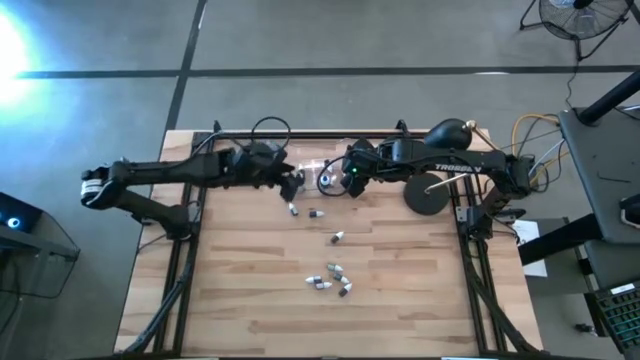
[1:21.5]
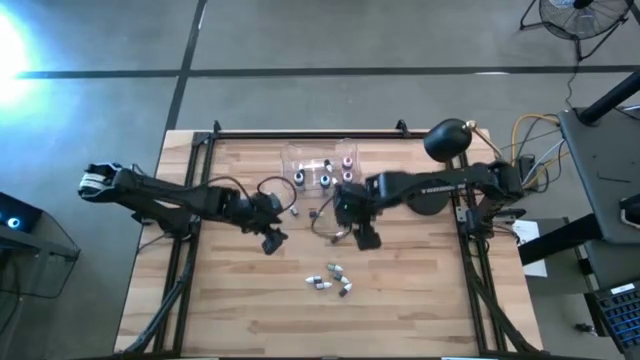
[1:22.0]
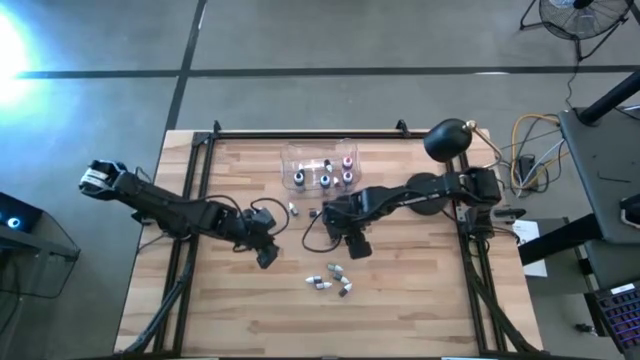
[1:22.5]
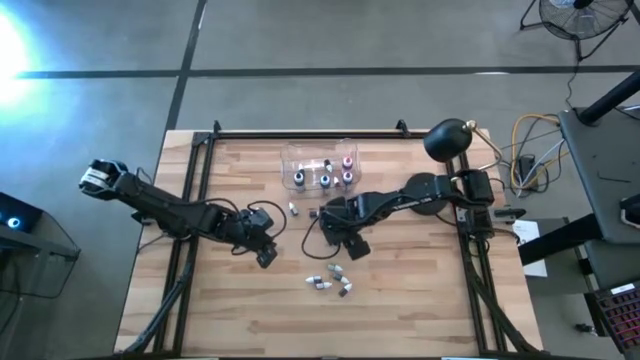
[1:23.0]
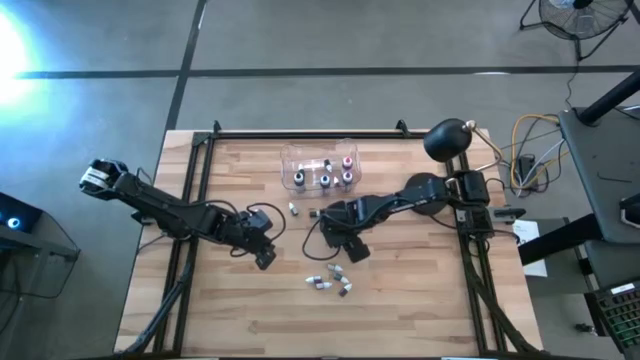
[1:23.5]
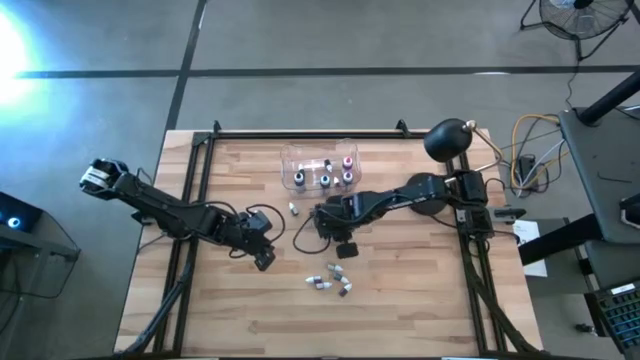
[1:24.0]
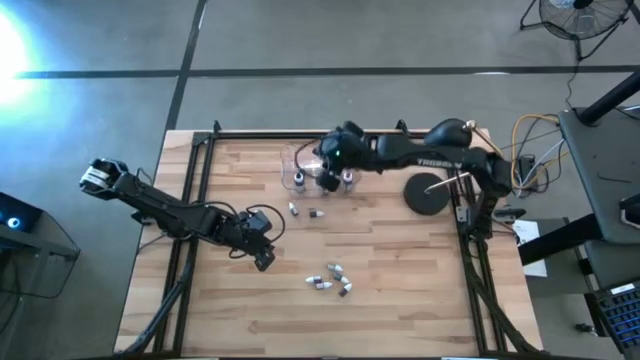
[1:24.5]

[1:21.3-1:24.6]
Task: Pick & Place food coloring
Put the small black food coloring bottle into the transparent bin

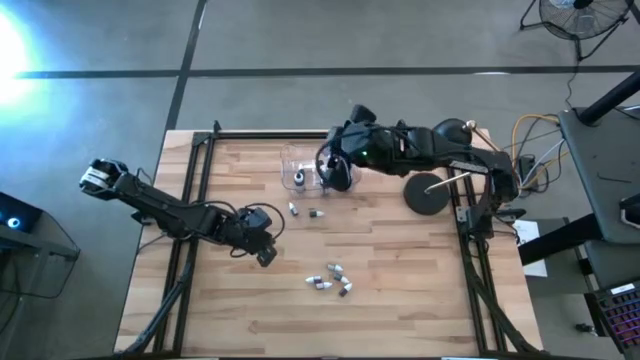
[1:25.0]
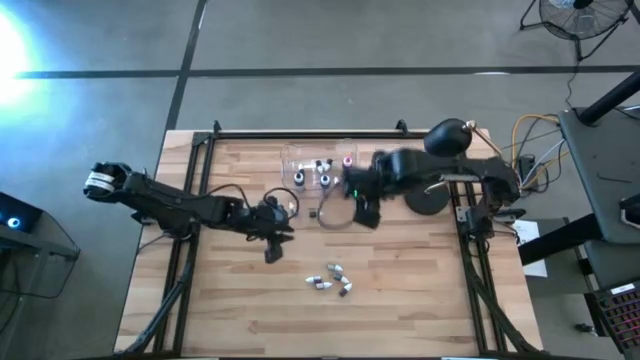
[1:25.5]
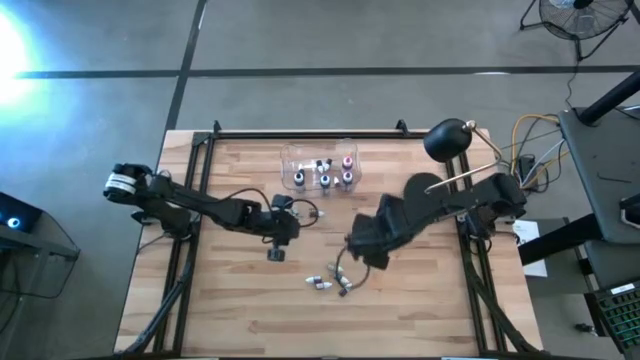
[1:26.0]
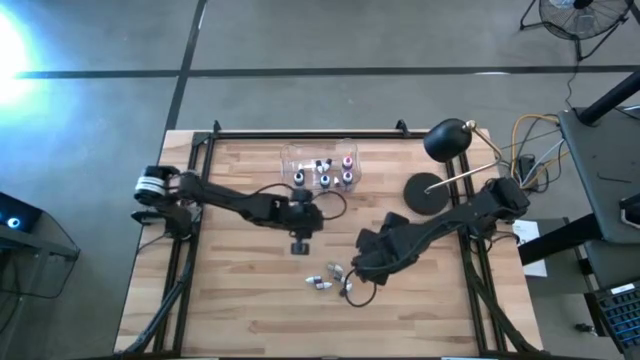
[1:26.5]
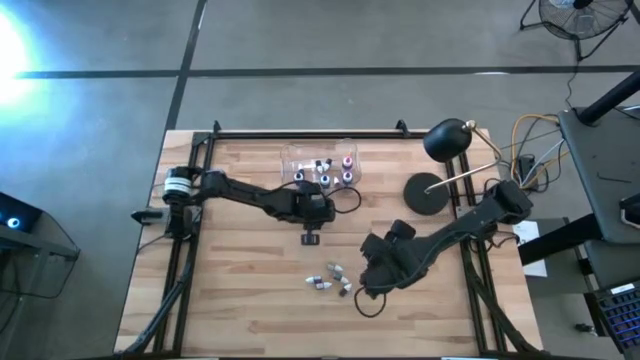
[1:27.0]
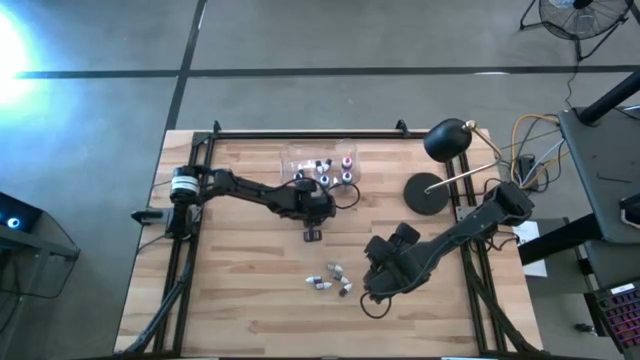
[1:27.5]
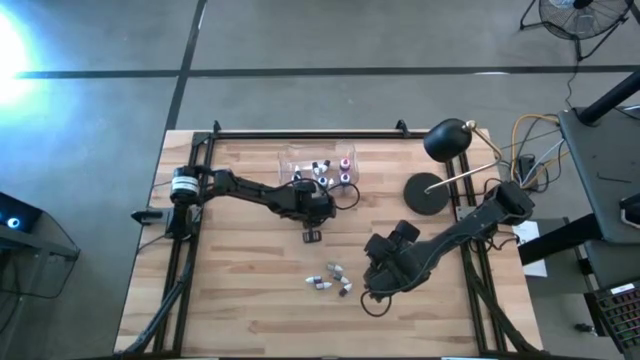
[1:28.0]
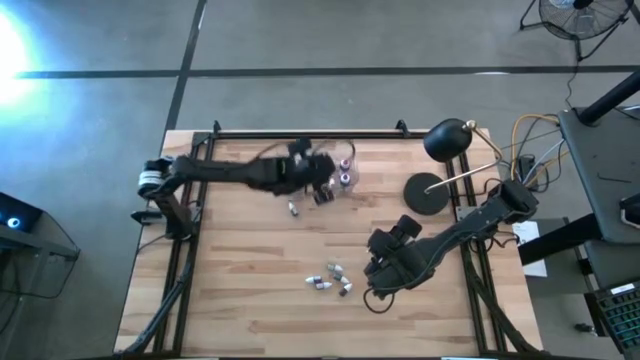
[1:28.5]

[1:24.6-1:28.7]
Put the small green food coloring bottle into the transparent bin

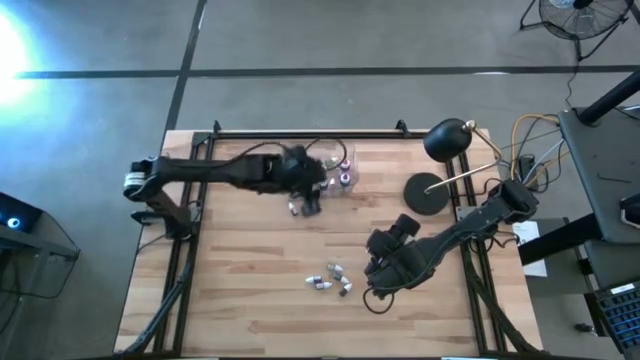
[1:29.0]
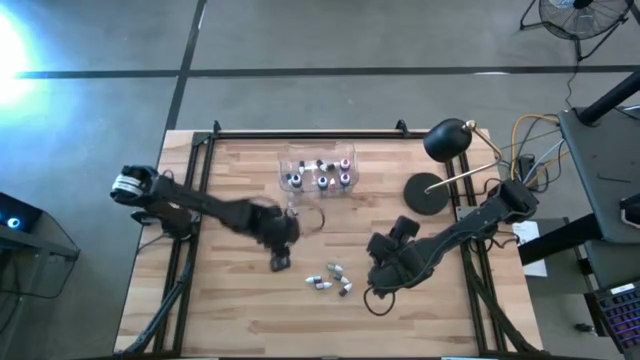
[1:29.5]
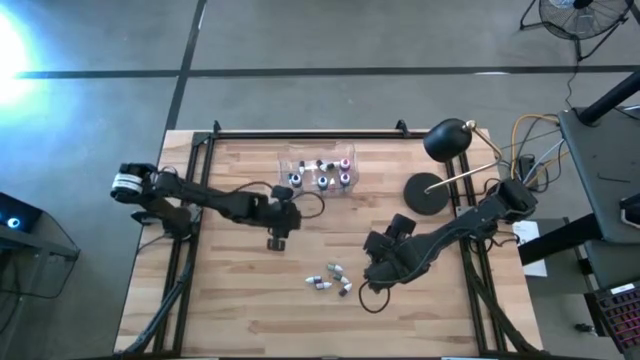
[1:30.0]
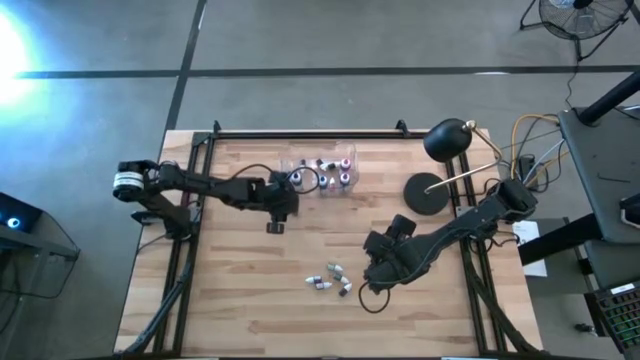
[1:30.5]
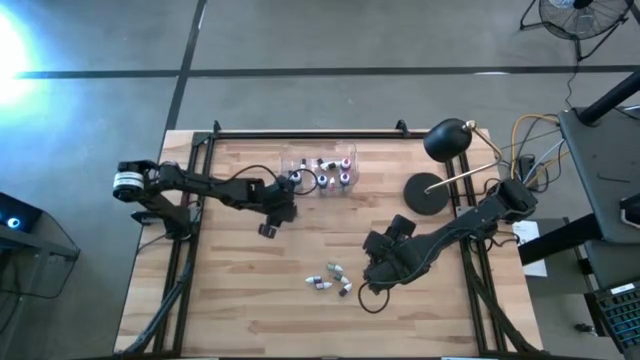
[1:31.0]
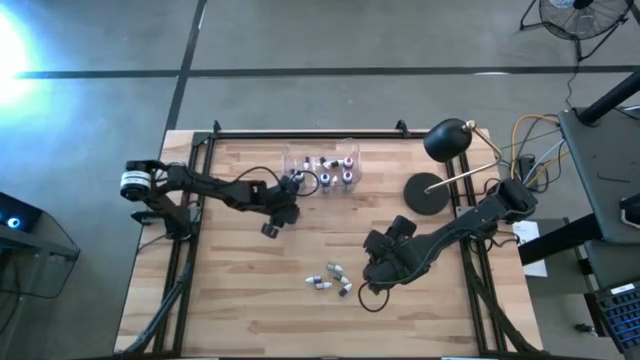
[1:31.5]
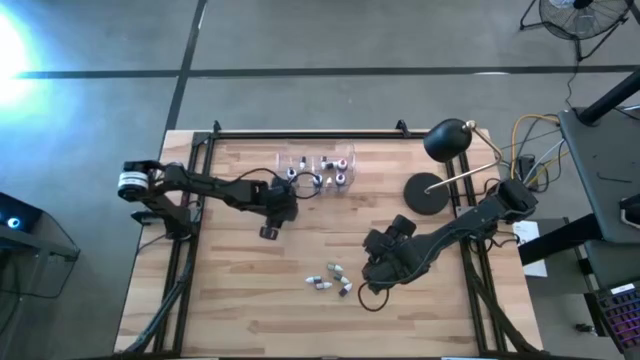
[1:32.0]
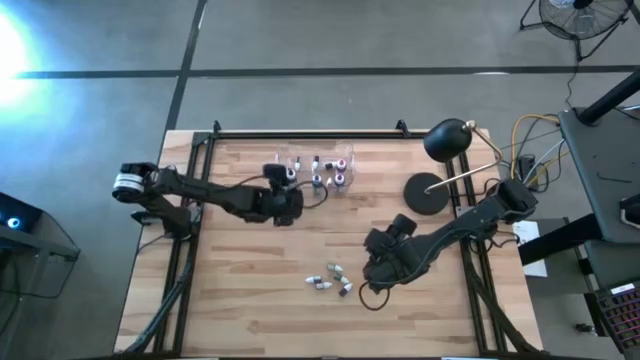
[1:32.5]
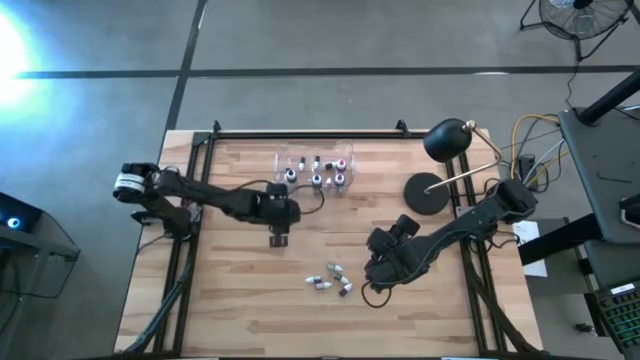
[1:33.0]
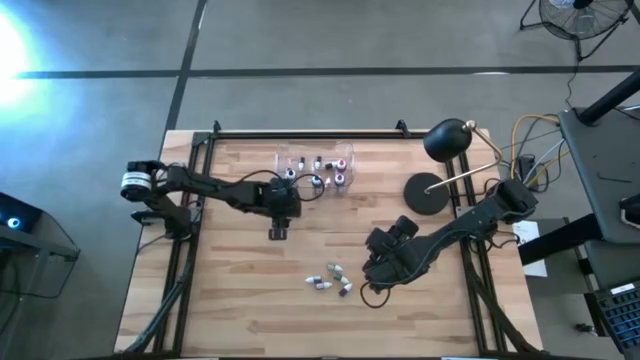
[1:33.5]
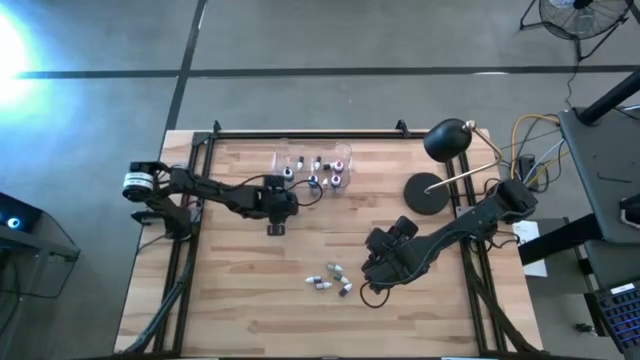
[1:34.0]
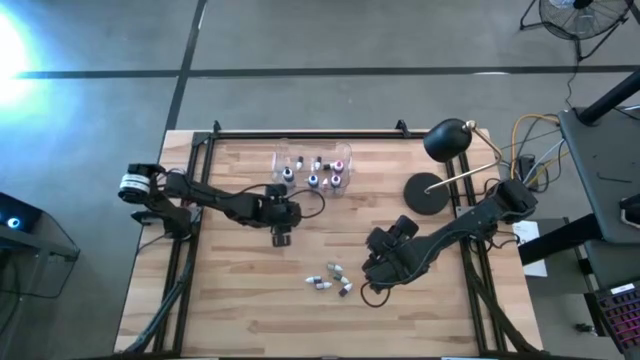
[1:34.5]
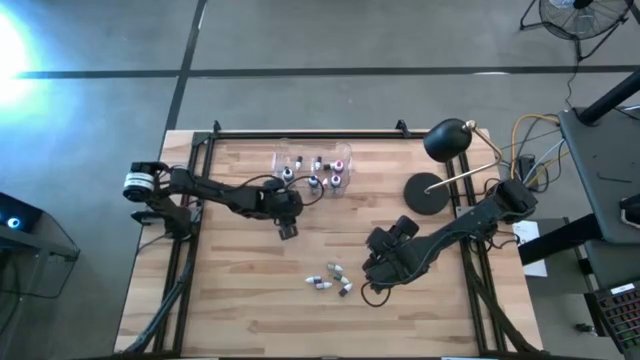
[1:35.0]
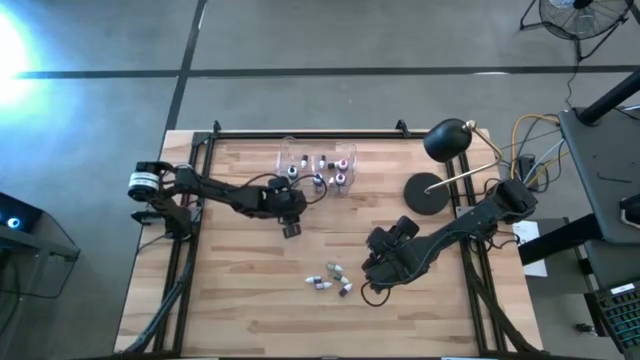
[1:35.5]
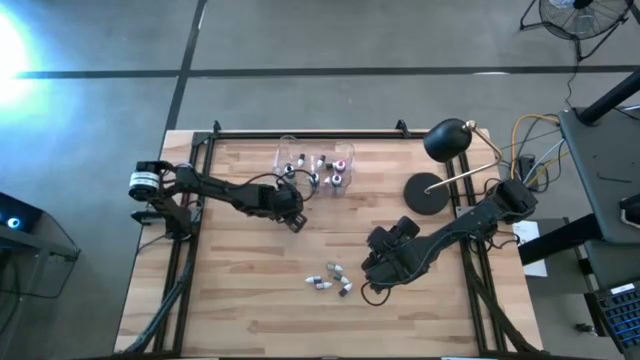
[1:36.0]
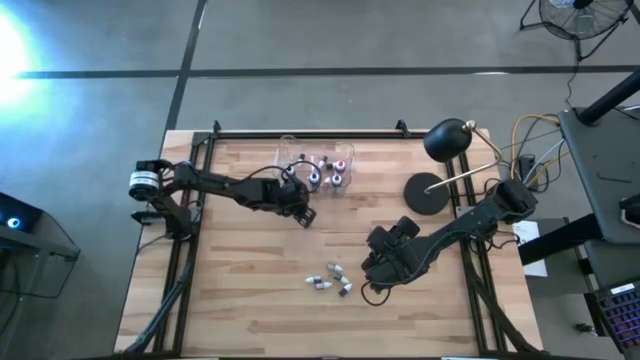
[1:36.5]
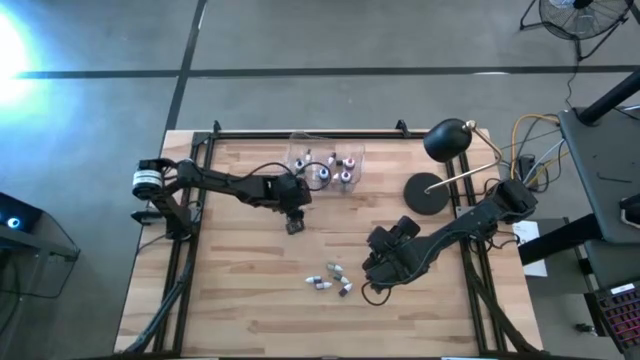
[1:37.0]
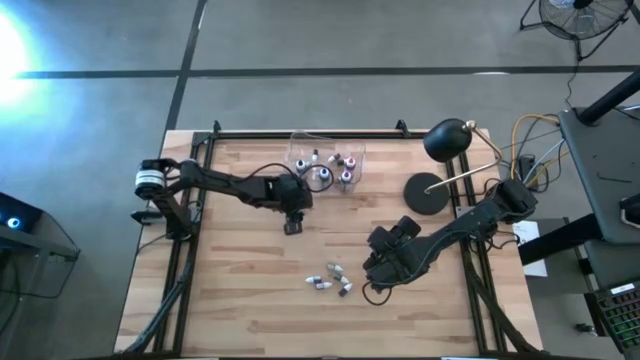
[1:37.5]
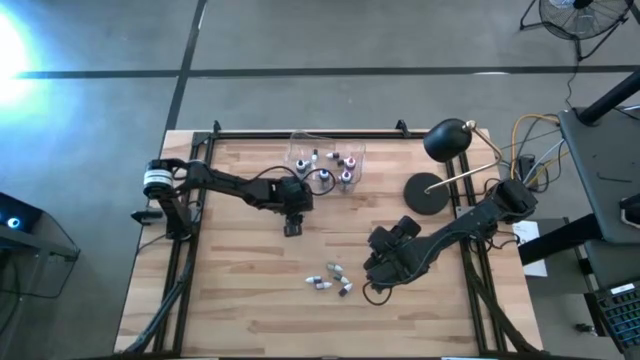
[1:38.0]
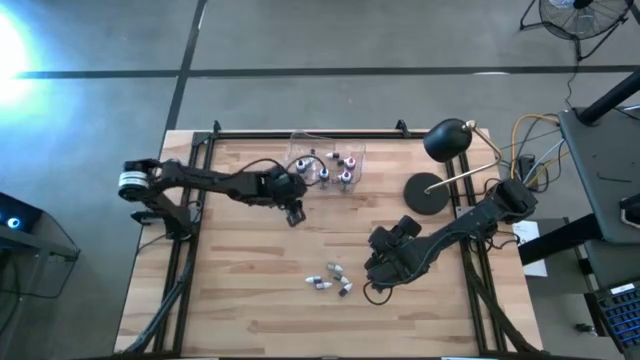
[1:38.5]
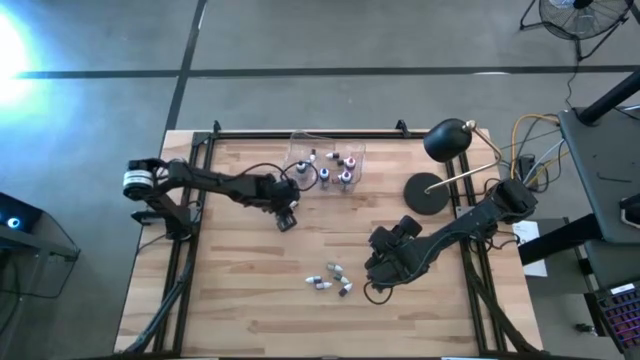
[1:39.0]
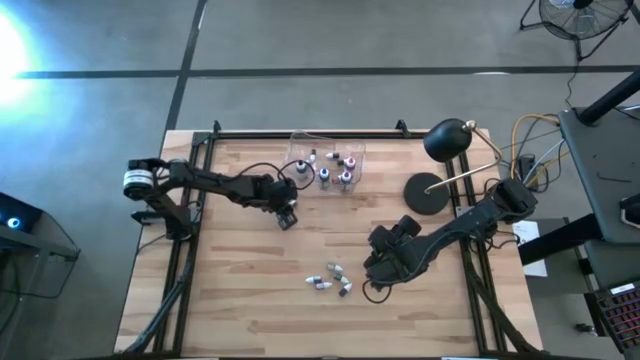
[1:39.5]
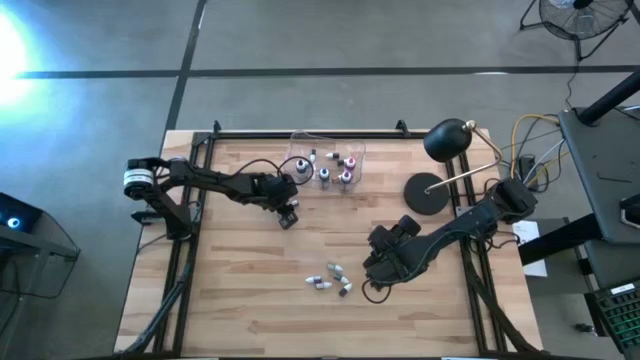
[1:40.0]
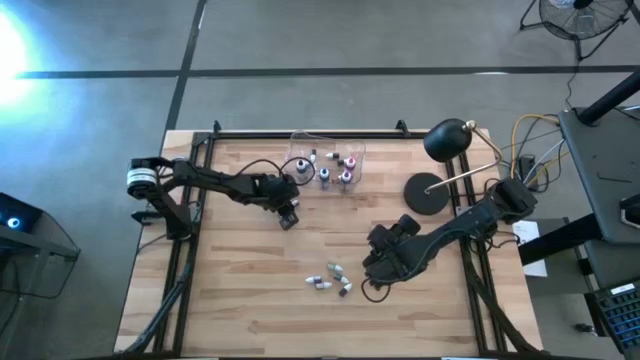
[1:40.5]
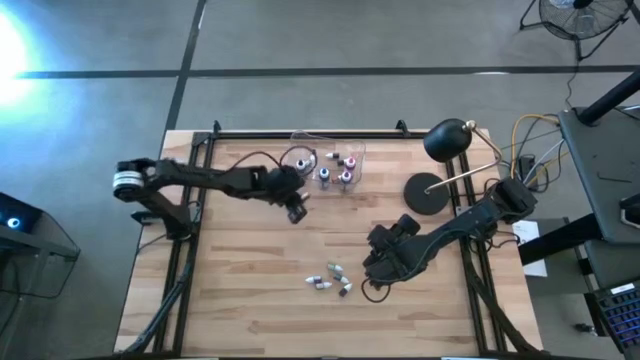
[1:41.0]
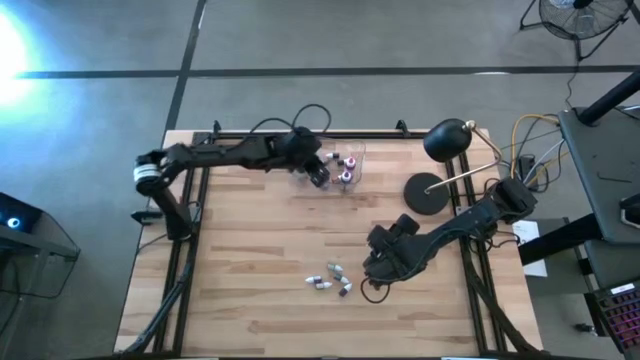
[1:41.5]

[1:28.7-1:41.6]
Put the small brown food coloring bottle into the transparent bin

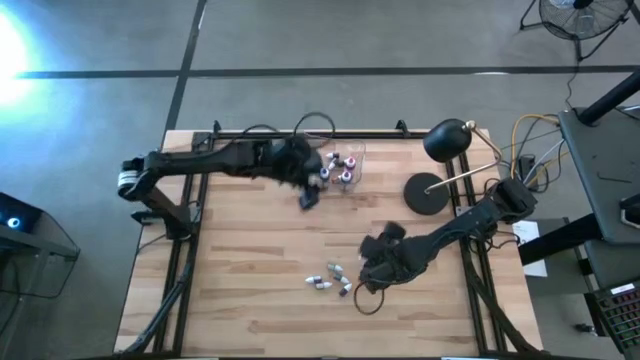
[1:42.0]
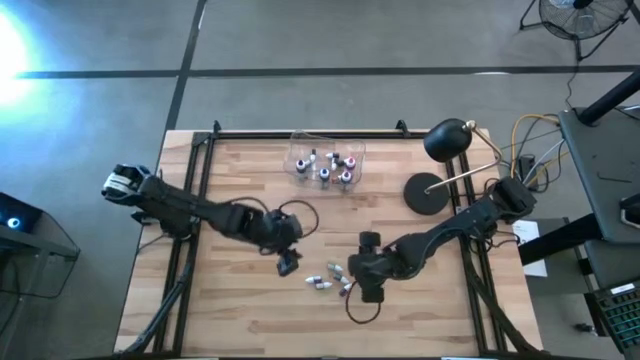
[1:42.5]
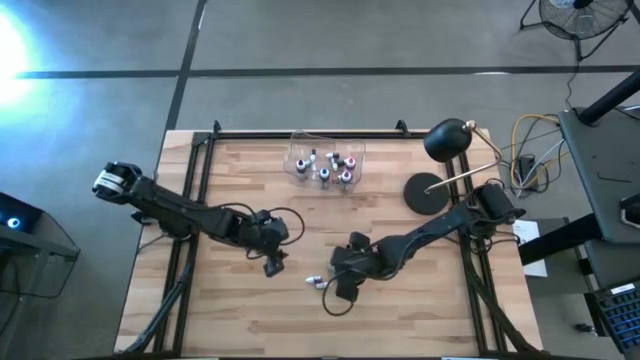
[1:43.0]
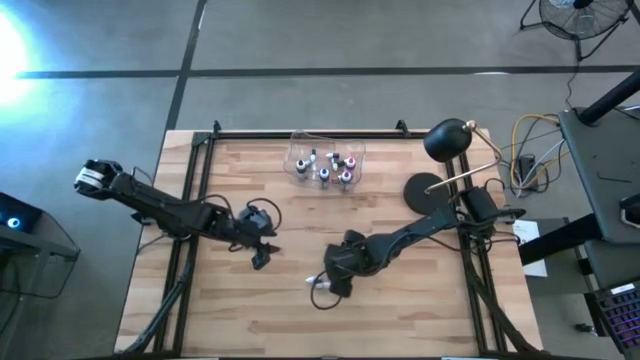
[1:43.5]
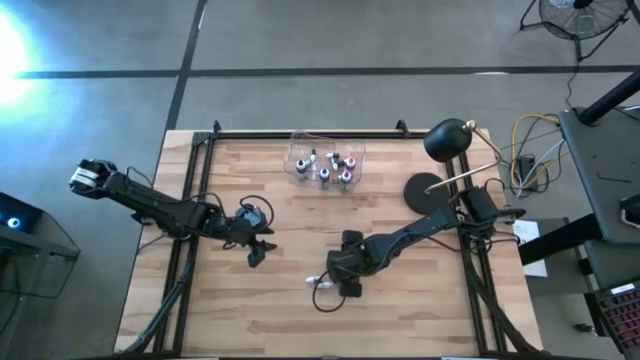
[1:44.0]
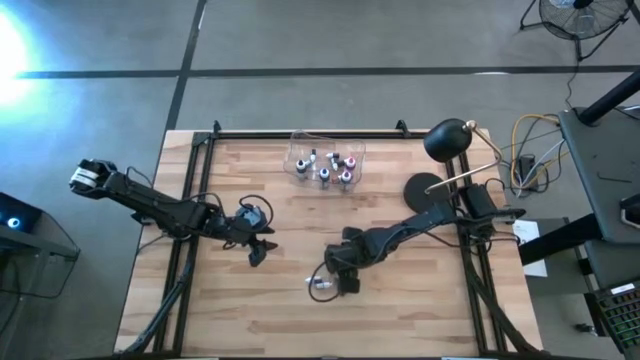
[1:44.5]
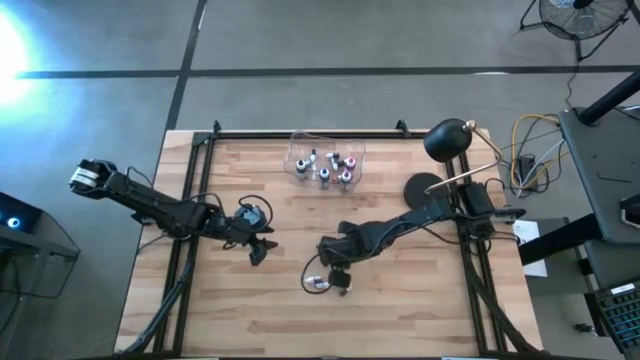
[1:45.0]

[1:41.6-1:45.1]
Put the small green food coloring bottle into the transparent bin
